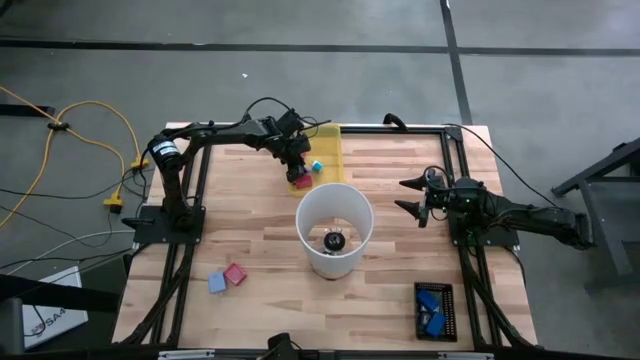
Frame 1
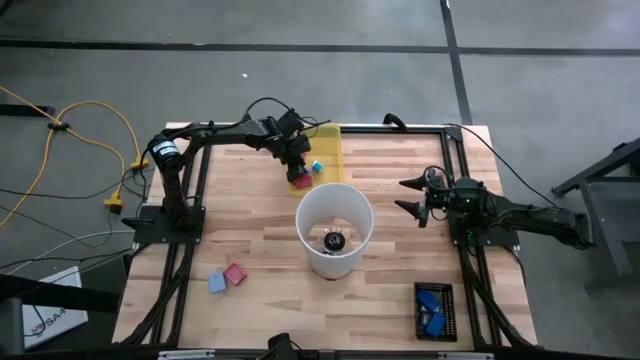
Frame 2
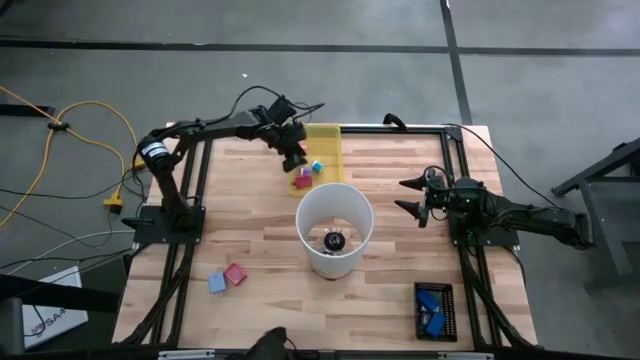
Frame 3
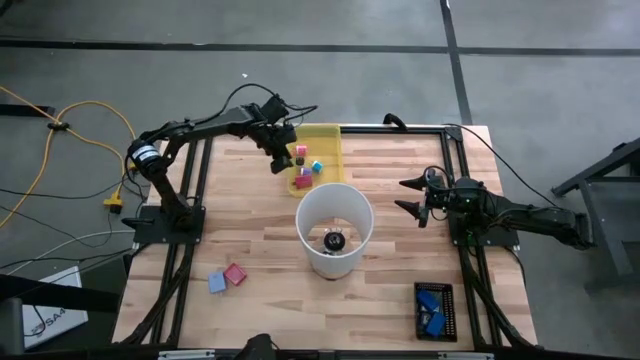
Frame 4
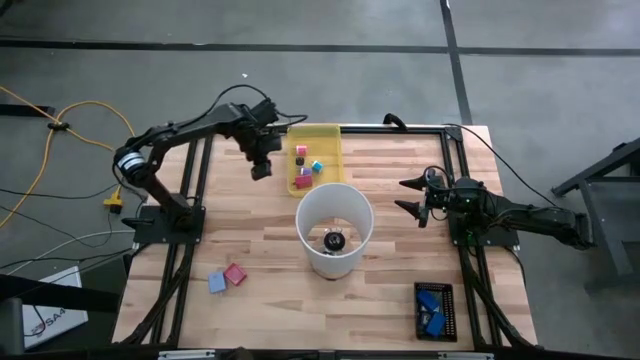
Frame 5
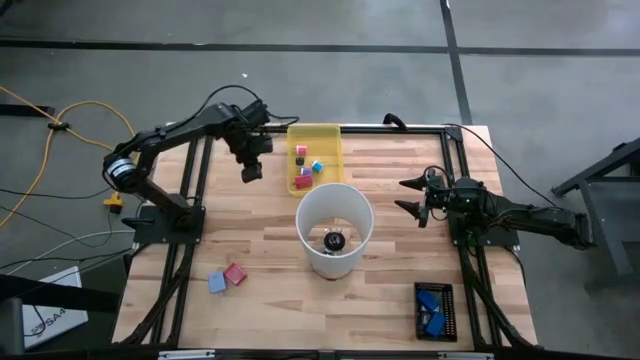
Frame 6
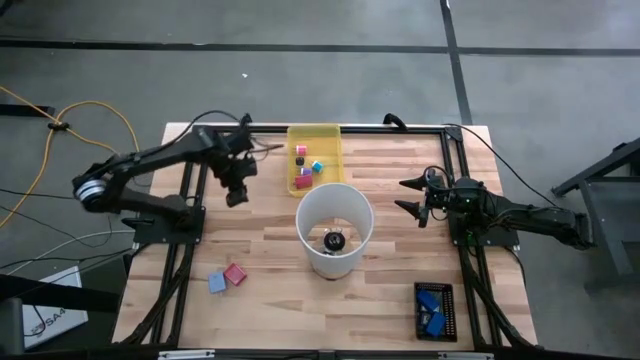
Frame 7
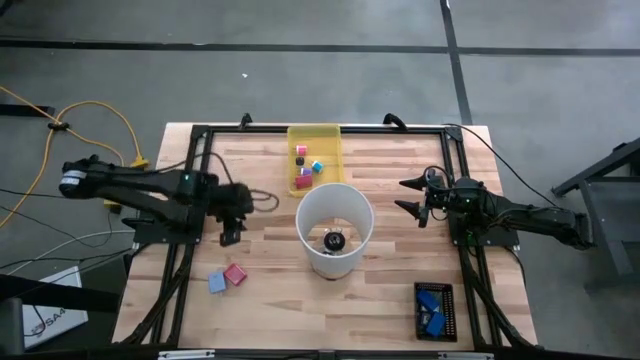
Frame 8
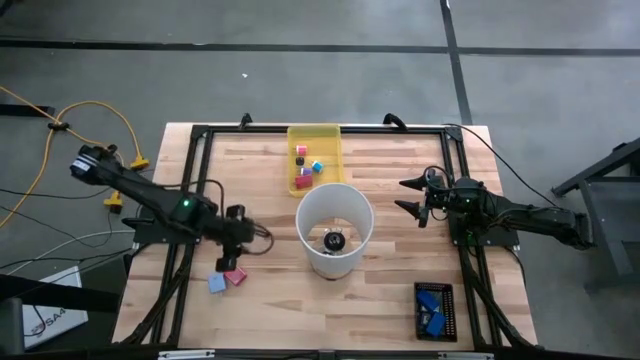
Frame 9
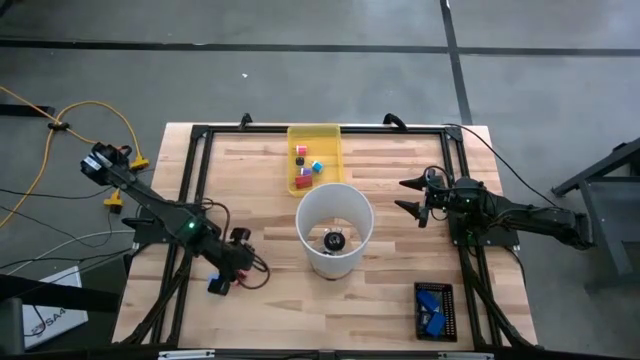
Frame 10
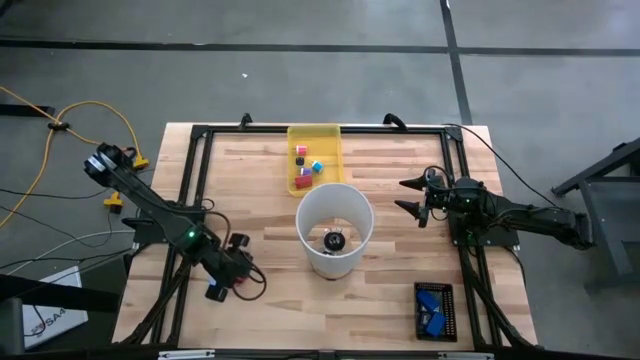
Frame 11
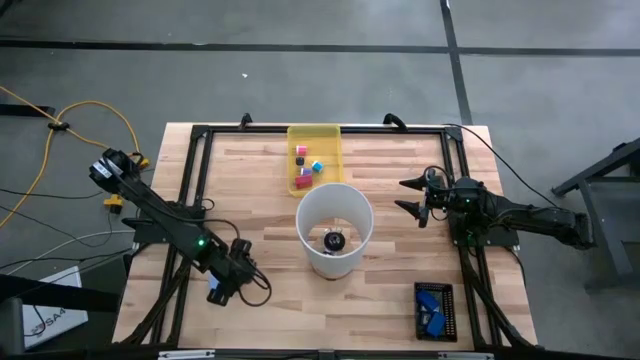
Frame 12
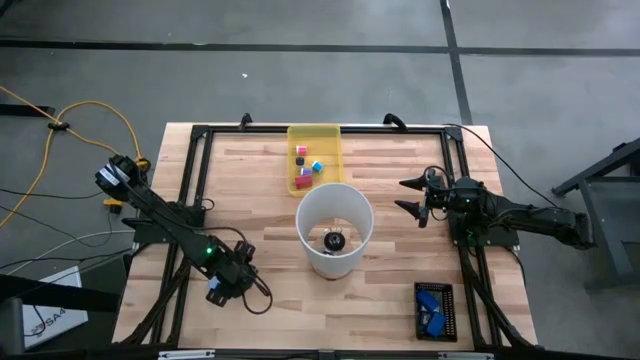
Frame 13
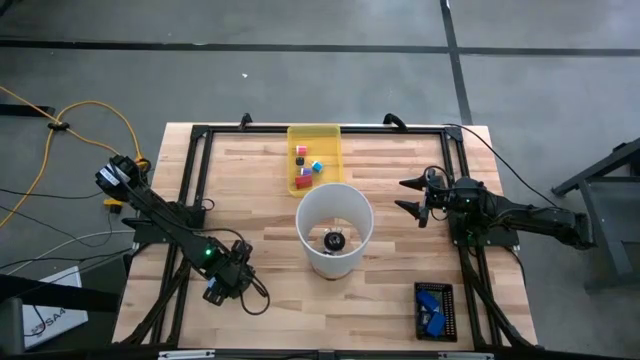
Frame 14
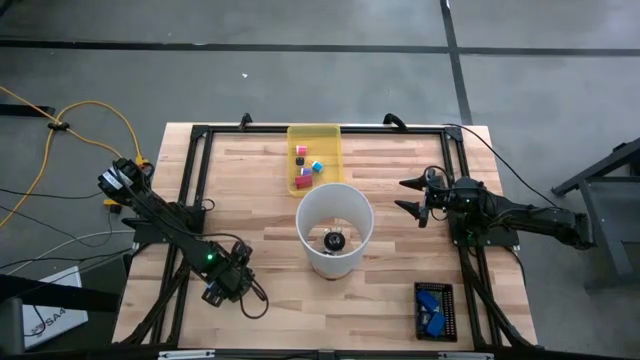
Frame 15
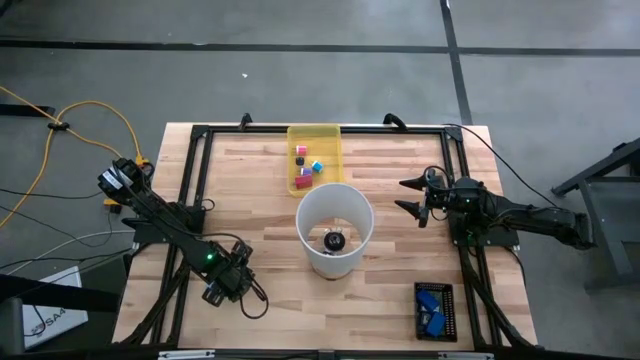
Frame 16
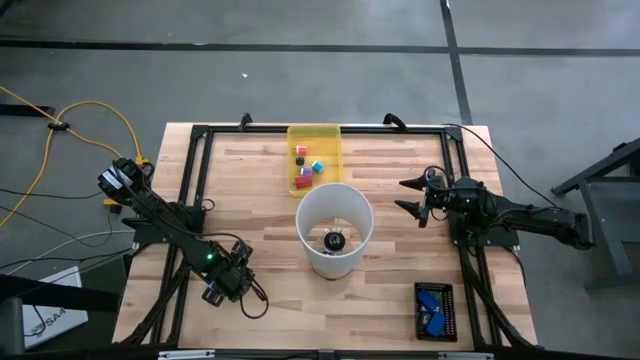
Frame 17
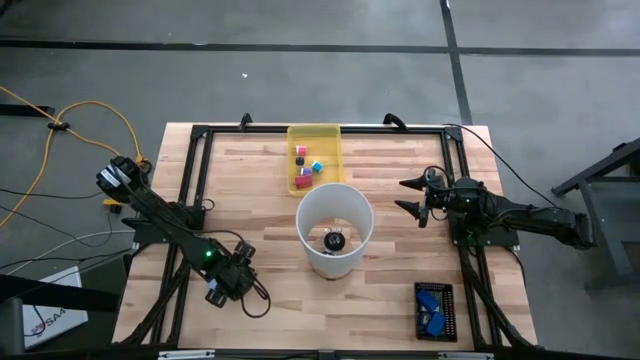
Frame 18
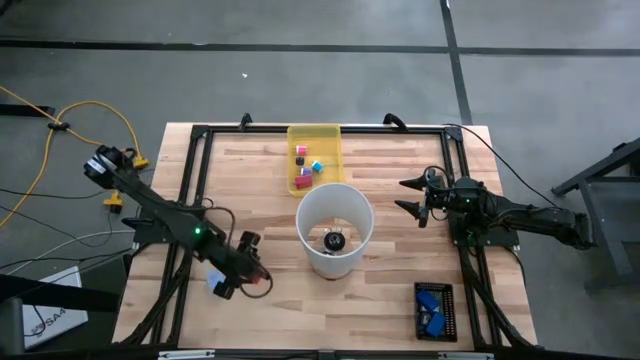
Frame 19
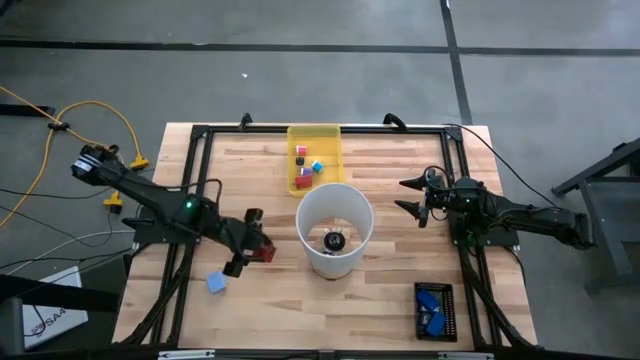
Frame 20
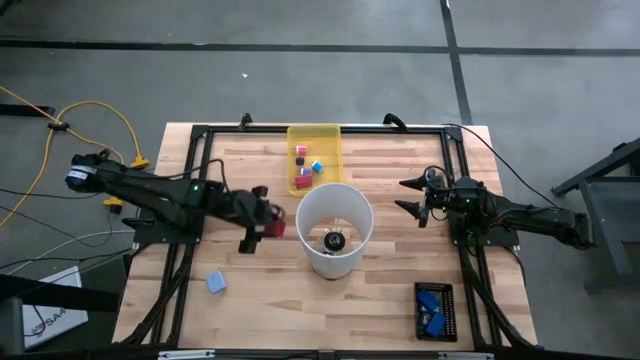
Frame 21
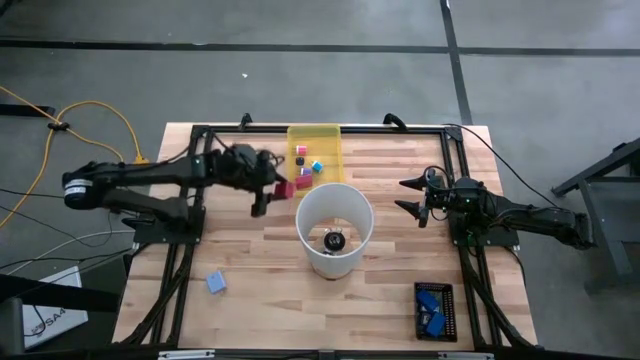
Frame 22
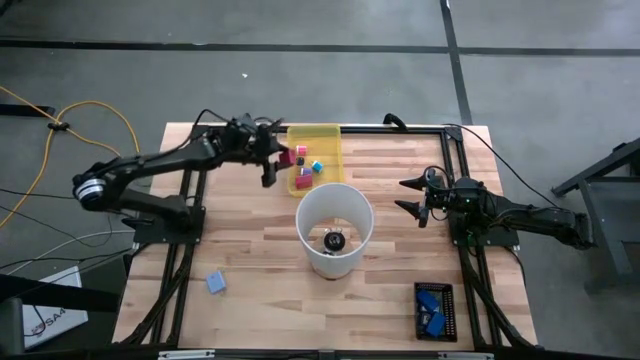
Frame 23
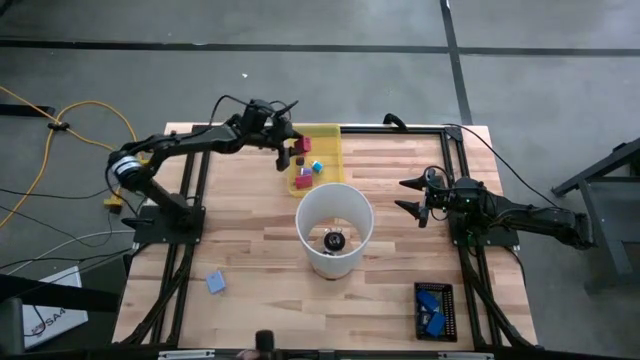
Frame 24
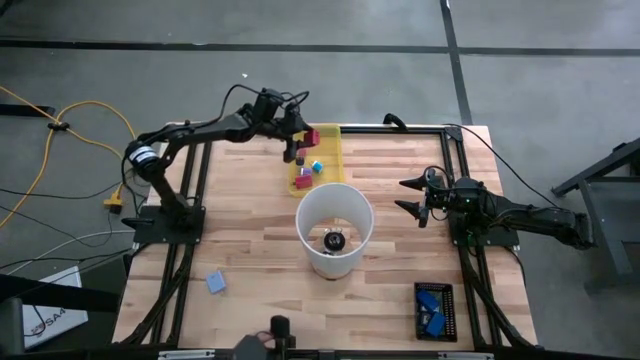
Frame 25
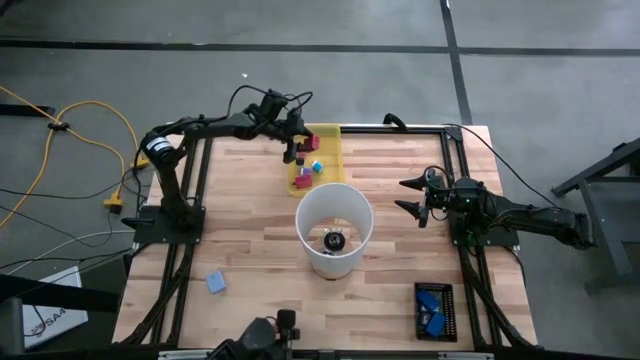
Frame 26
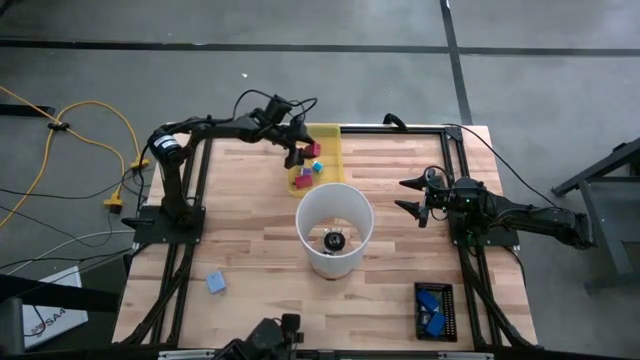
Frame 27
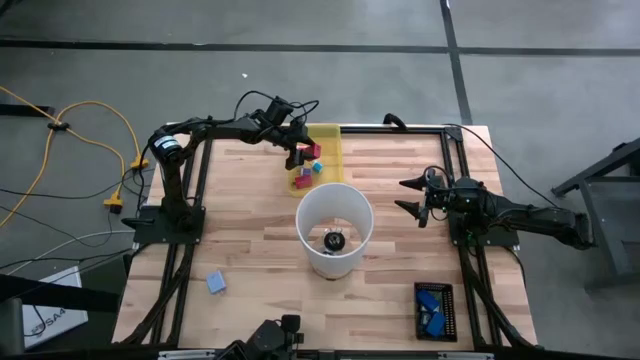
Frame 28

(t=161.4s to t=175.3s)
Task: Pick & Place Office items
Put the red charger adapter into the yellow bin
